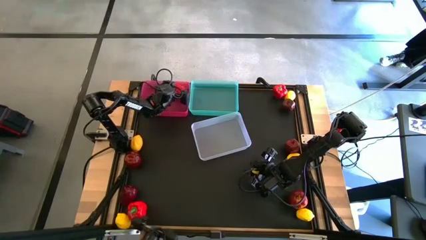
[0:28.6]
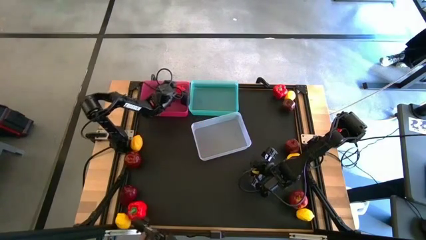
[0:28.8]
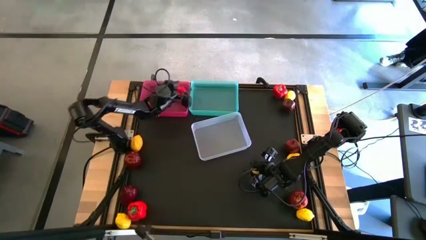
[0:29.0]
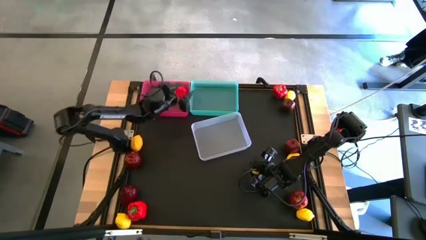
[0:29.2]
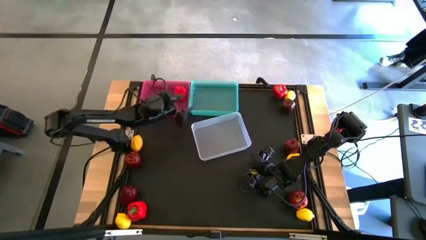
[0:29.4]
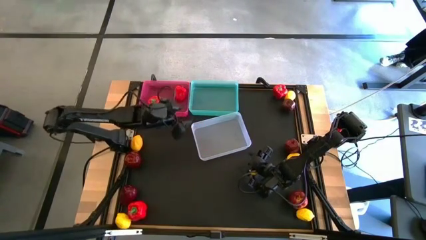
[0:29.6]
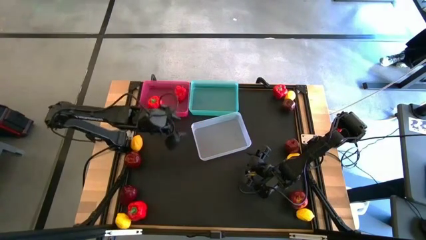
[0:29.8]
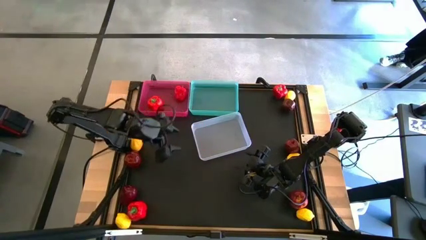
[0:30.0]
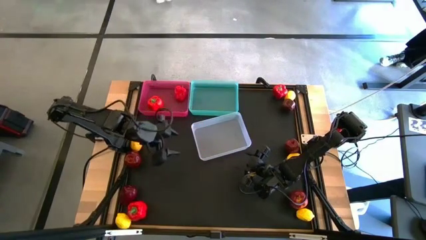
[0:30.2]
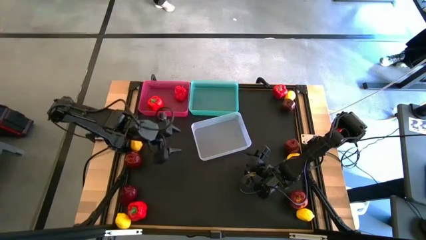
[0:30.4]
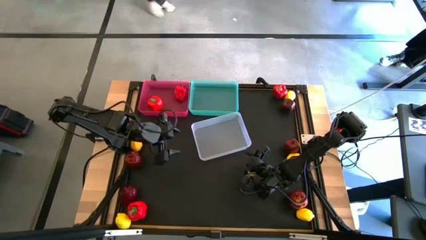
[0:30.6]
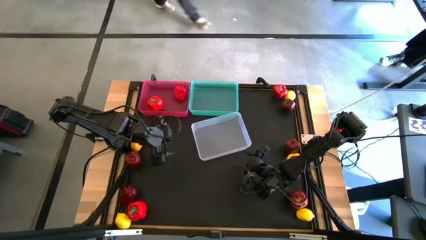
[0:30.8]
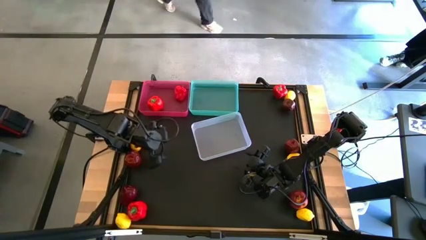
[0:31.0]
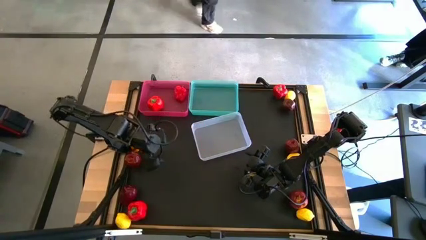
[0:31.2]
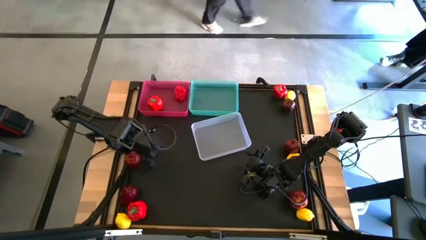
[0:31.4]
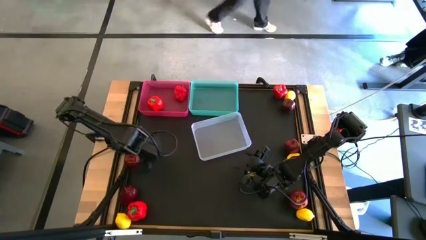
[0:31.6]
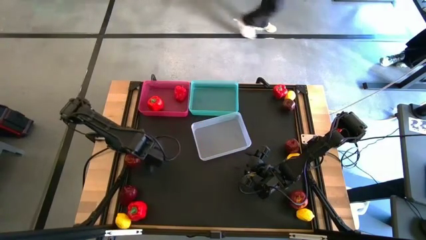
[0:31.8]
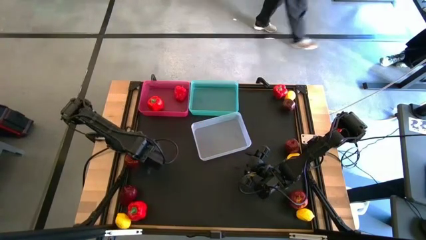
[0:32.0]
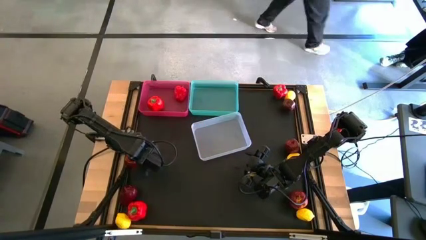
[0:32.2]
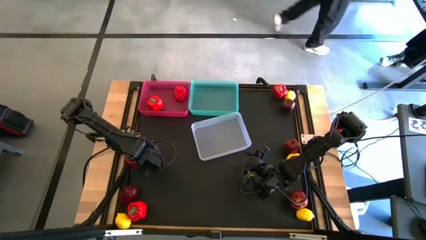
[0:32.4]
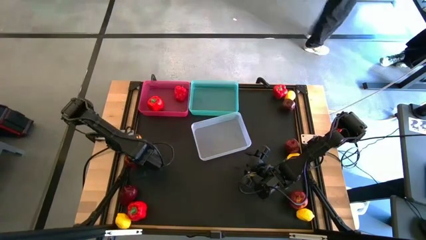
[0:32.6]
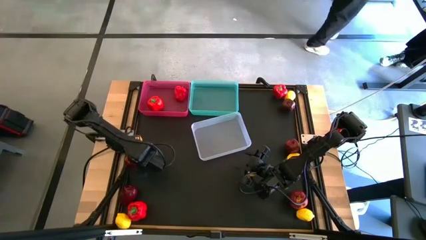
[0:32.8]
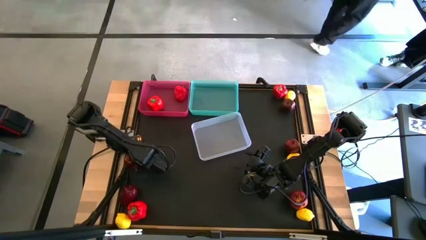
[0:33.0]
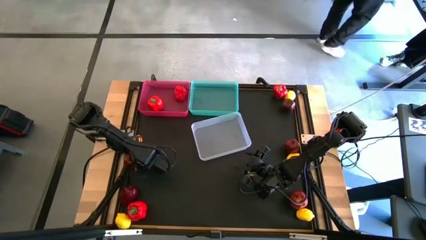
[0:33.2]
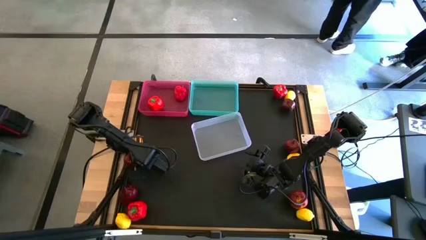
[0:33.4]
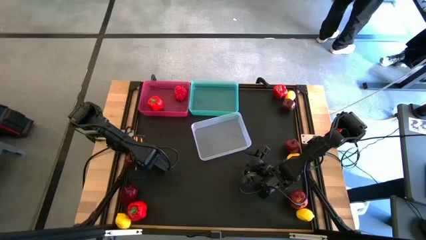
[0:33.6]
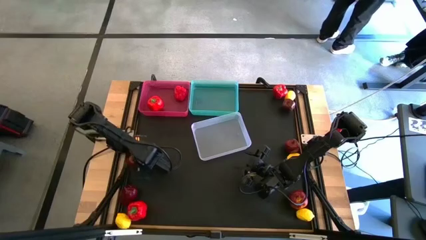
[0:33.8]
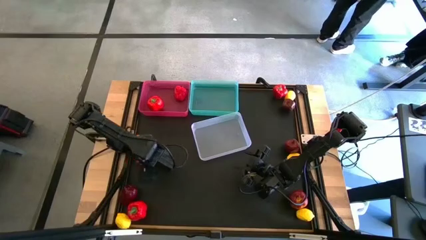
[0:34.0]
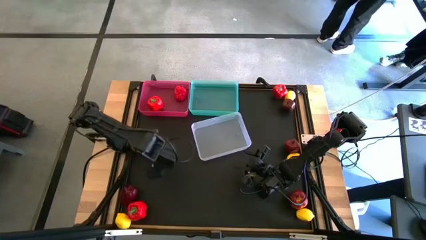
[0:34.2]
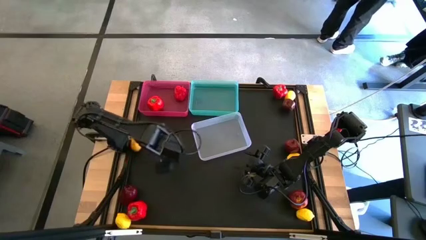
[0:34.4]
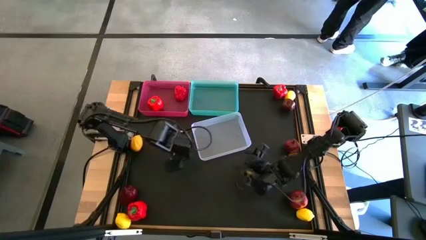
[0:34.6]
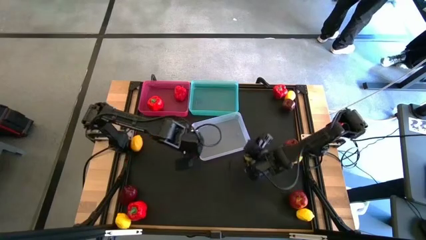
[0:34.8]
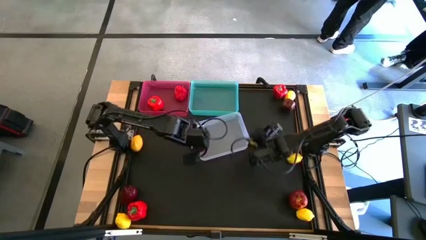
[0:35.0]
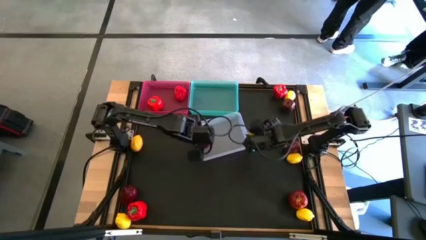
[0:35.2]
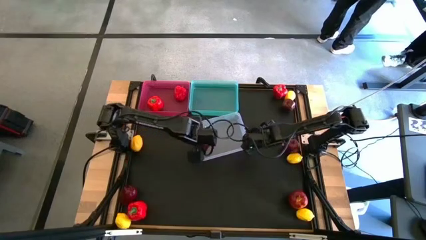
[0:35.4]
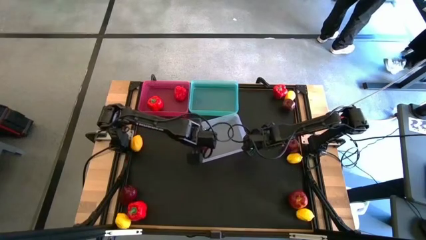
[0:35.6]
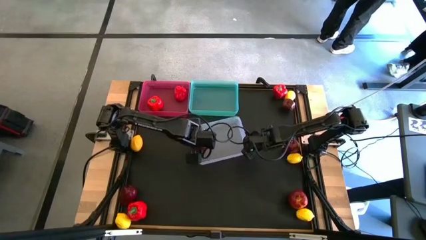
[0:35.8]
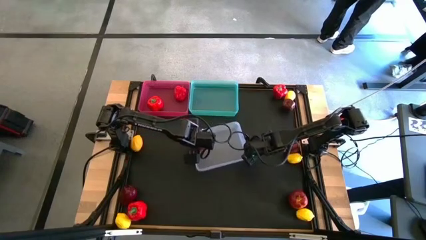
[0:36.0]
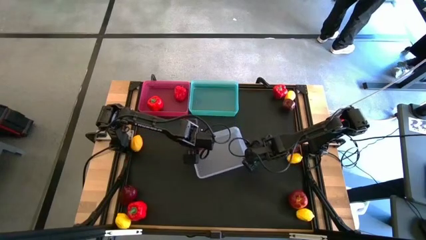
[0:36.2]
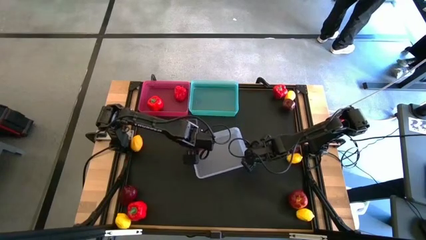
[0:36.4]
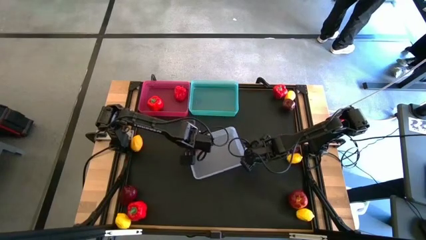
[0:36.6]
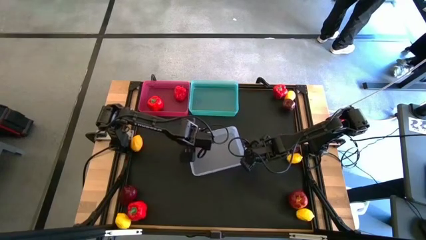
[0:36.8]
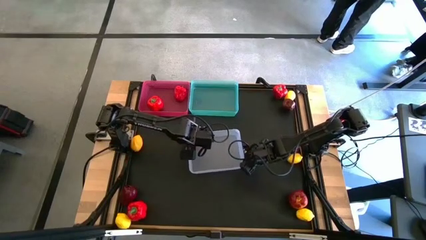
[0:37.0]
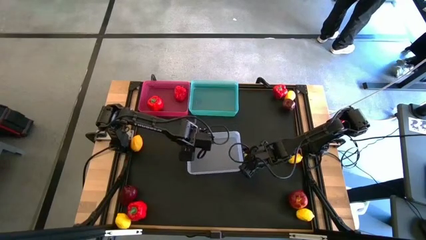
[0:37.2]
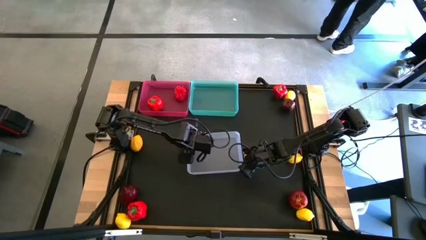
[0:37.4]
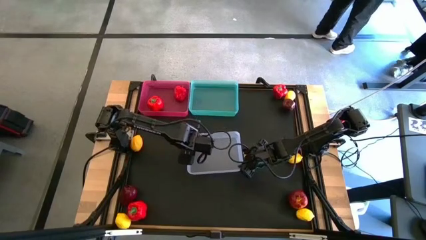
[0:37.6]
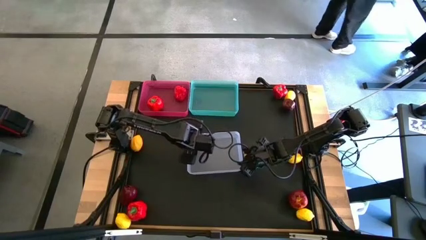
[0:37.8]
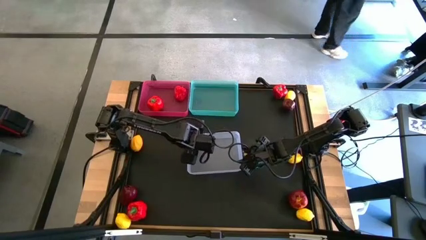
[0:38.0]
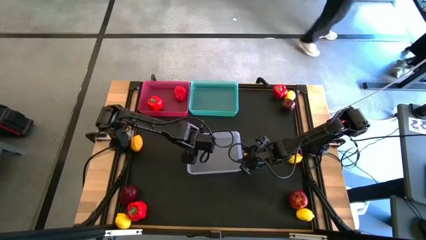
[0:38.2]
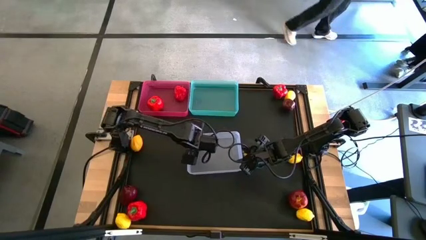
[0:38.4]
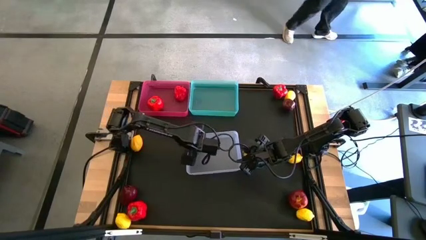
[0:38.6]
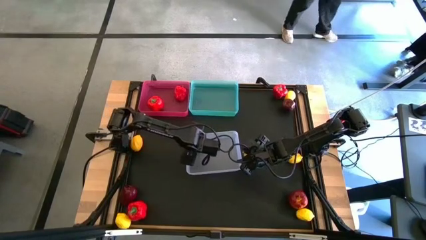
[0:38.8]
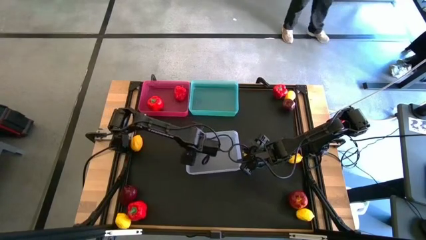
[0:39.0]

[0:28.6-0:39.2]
Task: Sort produce into baskets
Put the dark red apple into the transparent bin
